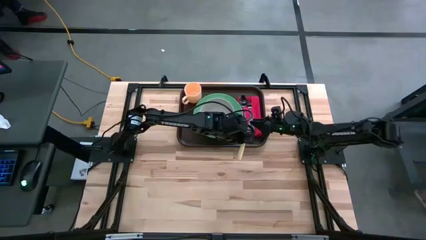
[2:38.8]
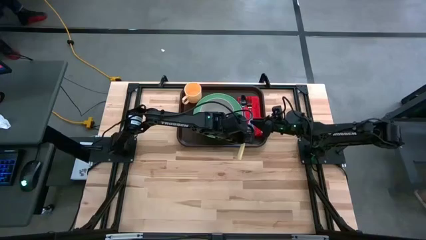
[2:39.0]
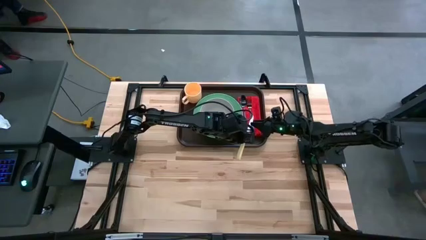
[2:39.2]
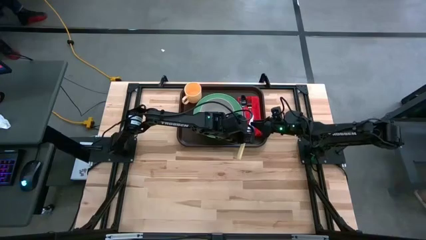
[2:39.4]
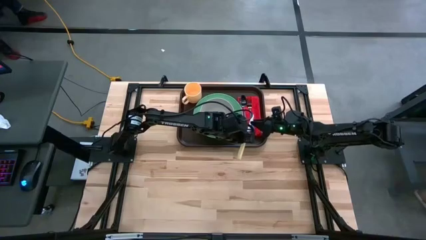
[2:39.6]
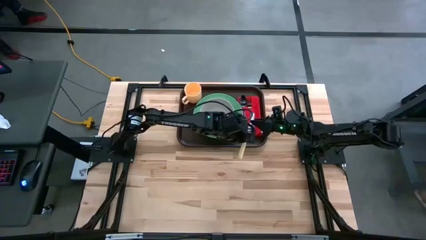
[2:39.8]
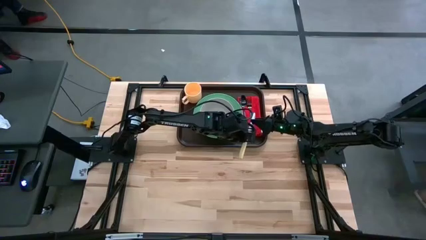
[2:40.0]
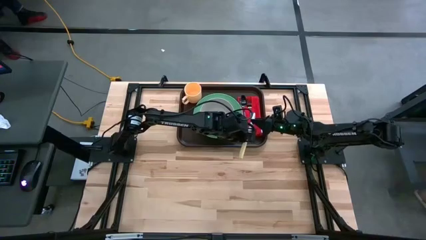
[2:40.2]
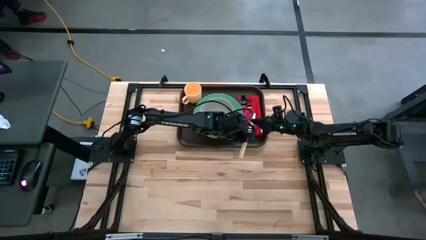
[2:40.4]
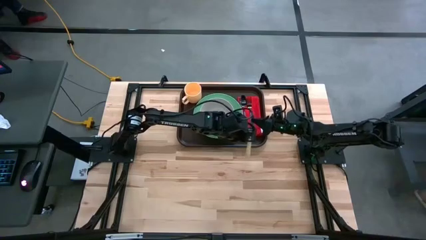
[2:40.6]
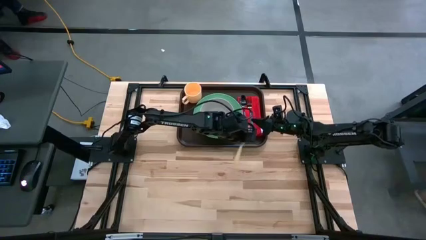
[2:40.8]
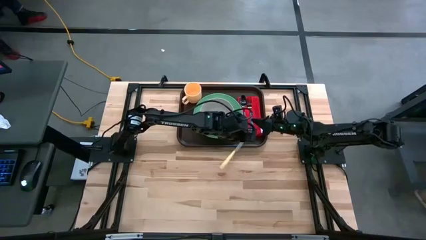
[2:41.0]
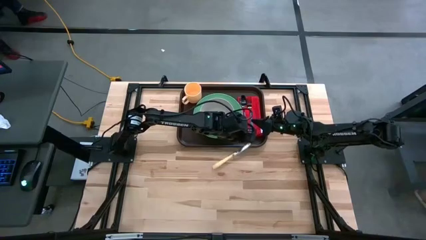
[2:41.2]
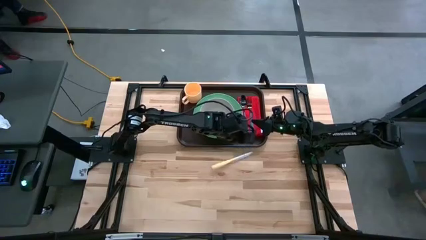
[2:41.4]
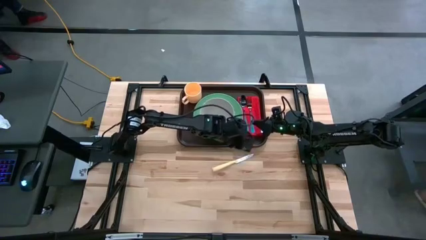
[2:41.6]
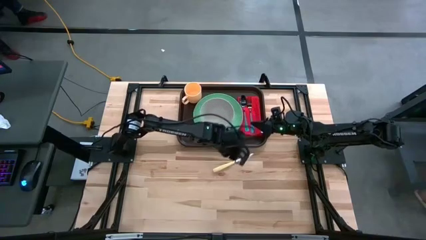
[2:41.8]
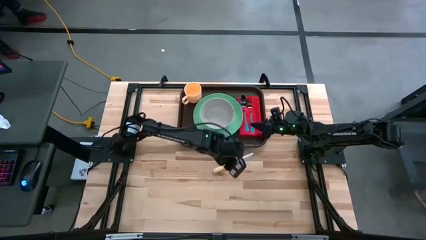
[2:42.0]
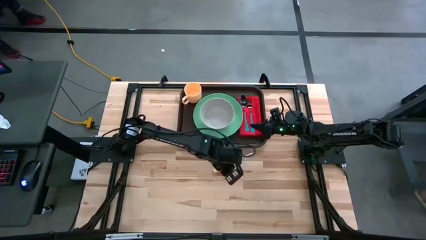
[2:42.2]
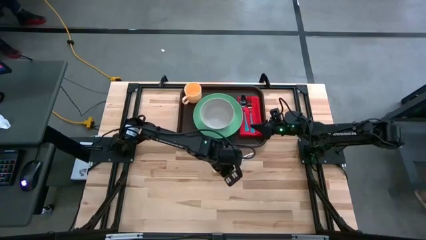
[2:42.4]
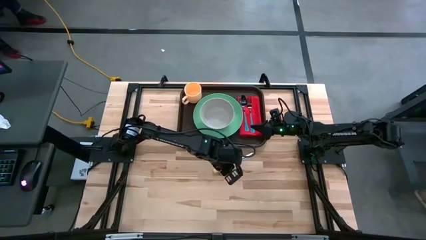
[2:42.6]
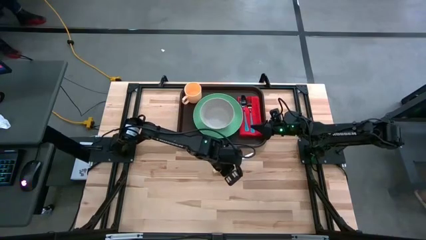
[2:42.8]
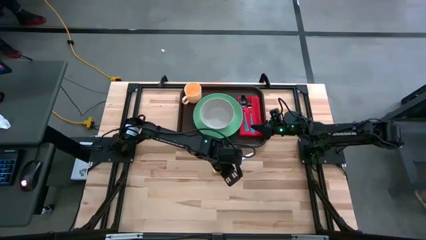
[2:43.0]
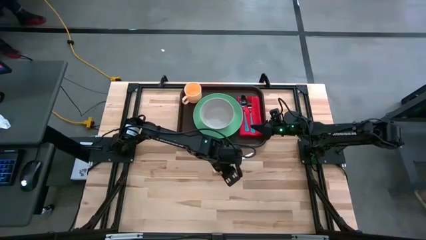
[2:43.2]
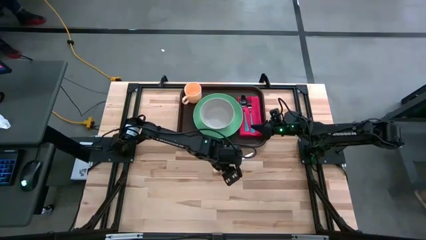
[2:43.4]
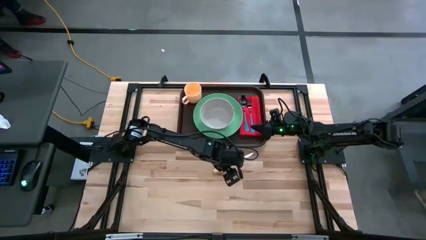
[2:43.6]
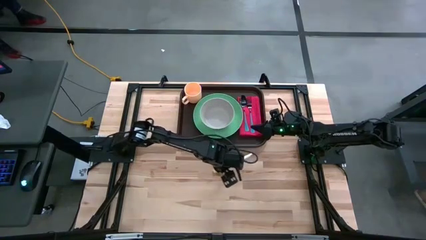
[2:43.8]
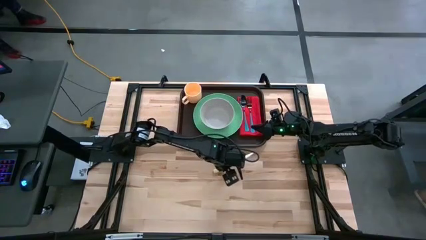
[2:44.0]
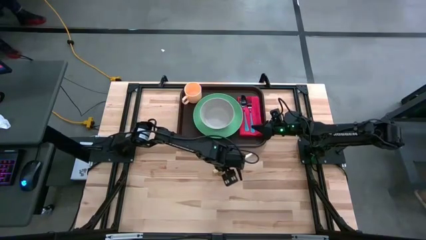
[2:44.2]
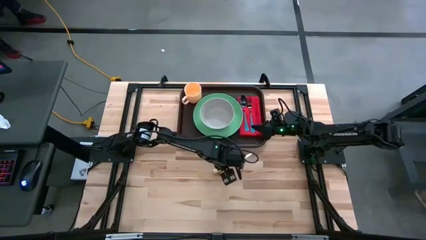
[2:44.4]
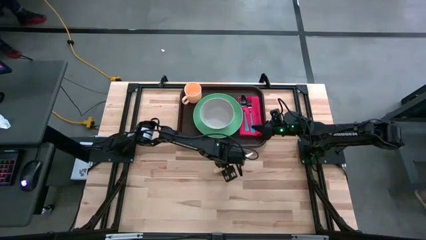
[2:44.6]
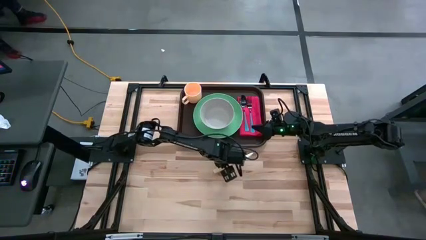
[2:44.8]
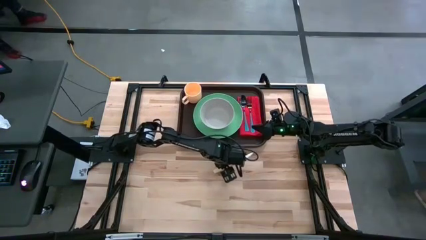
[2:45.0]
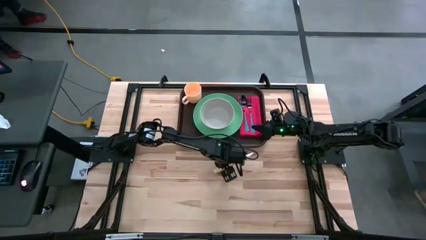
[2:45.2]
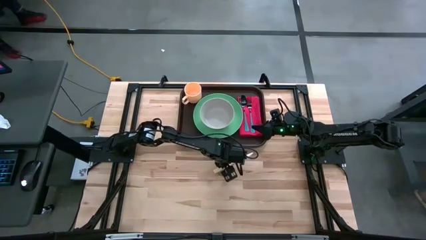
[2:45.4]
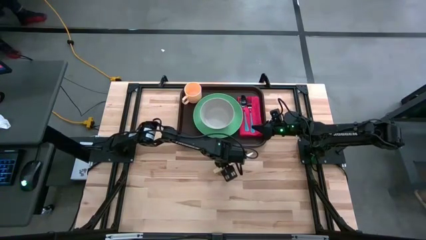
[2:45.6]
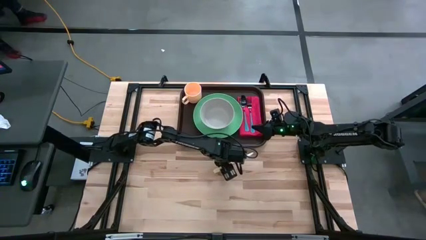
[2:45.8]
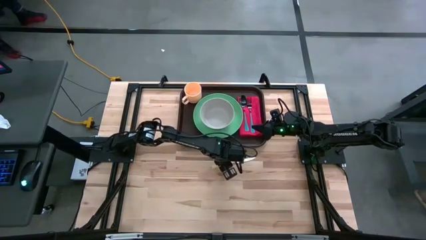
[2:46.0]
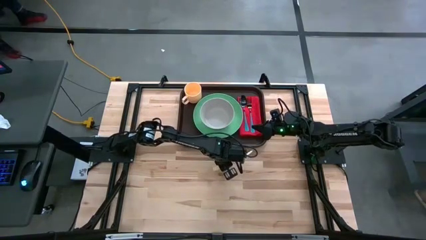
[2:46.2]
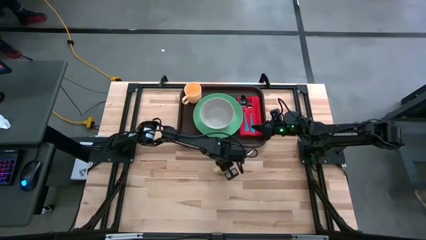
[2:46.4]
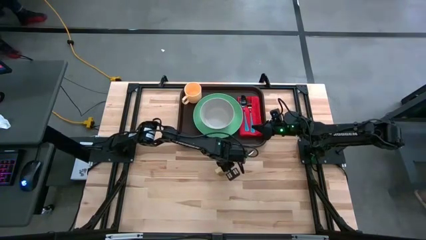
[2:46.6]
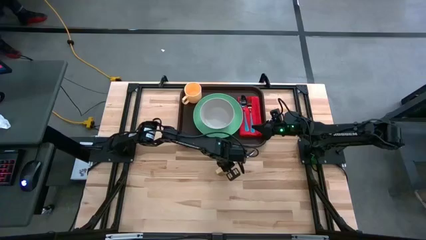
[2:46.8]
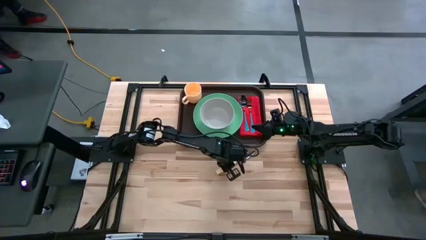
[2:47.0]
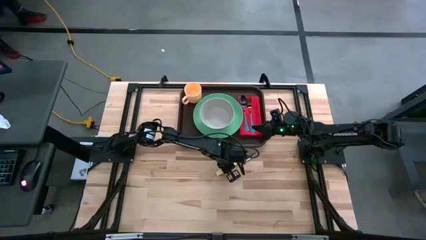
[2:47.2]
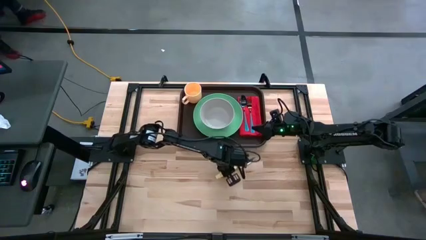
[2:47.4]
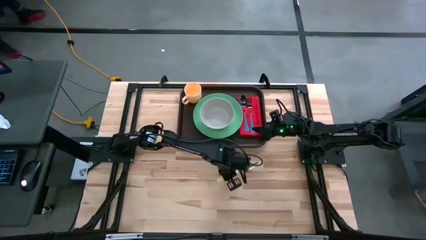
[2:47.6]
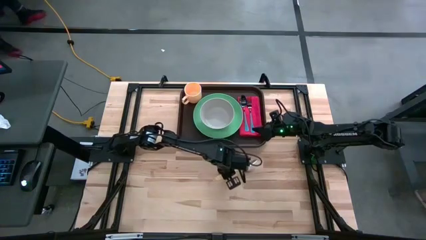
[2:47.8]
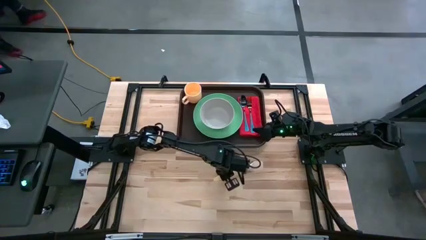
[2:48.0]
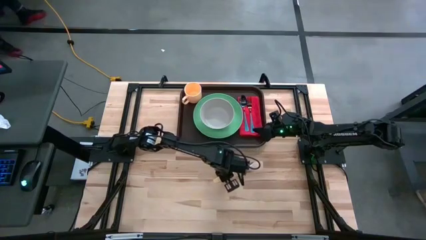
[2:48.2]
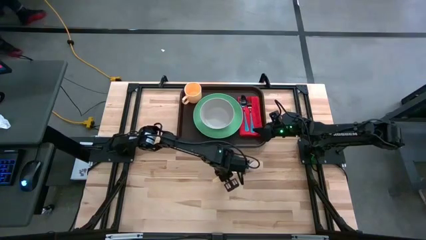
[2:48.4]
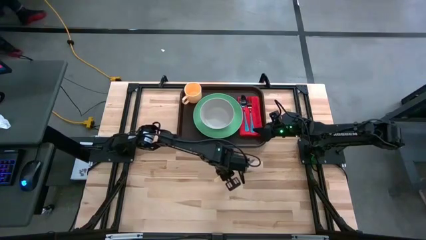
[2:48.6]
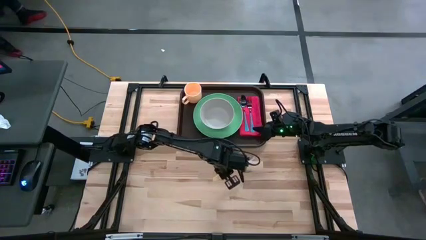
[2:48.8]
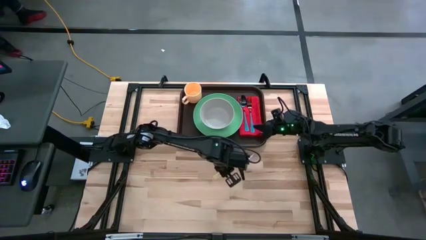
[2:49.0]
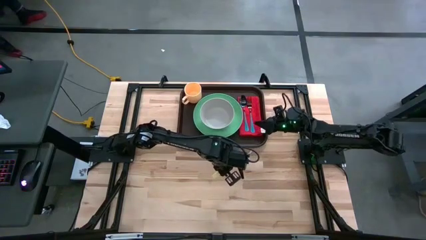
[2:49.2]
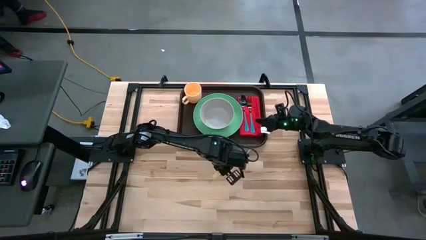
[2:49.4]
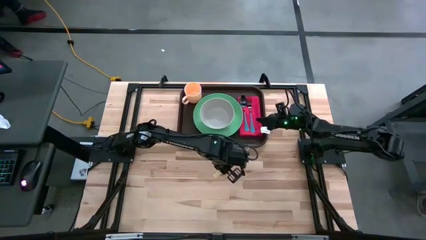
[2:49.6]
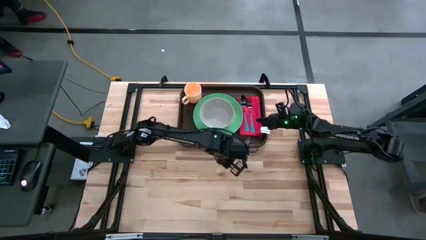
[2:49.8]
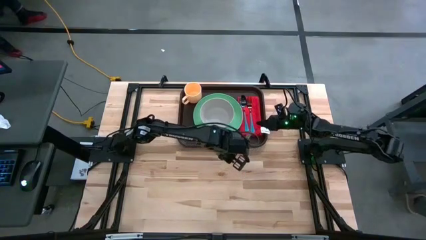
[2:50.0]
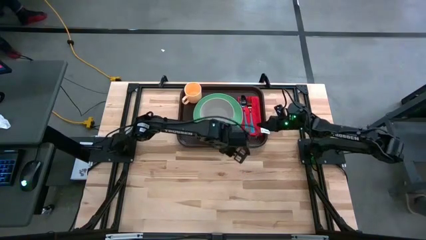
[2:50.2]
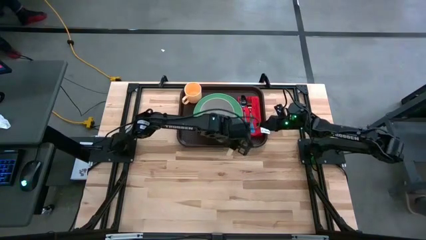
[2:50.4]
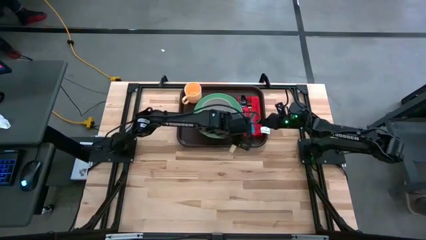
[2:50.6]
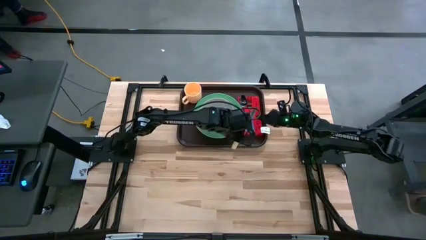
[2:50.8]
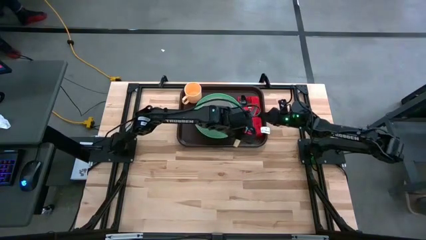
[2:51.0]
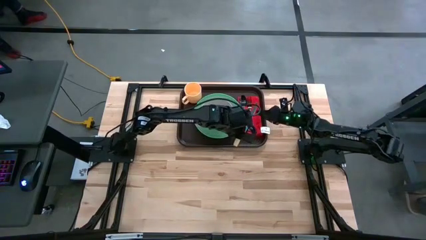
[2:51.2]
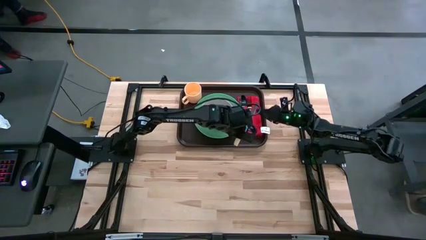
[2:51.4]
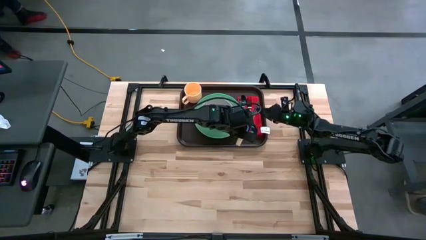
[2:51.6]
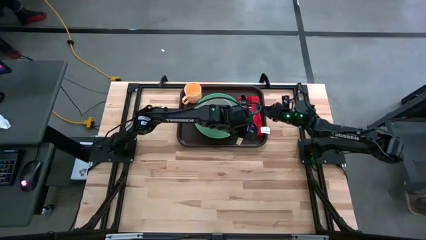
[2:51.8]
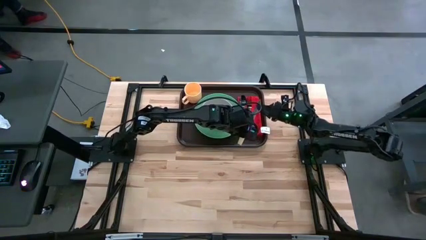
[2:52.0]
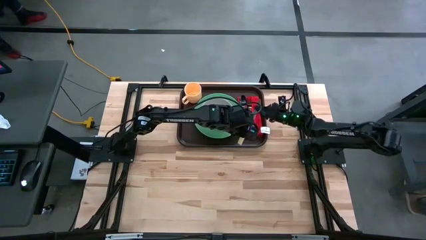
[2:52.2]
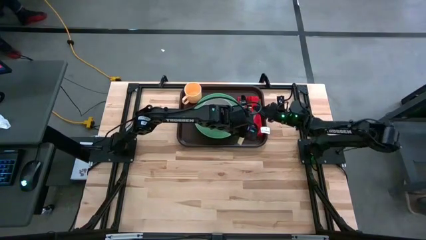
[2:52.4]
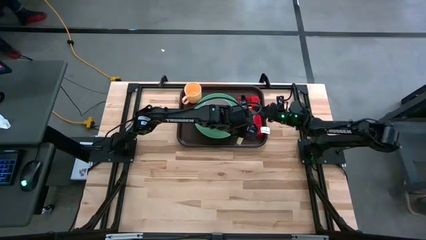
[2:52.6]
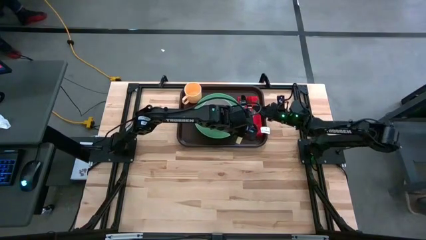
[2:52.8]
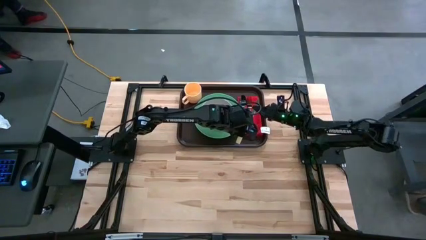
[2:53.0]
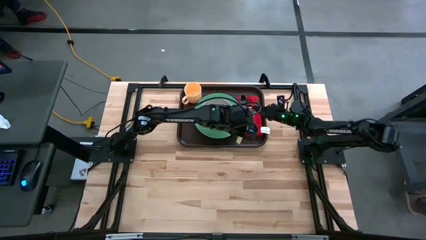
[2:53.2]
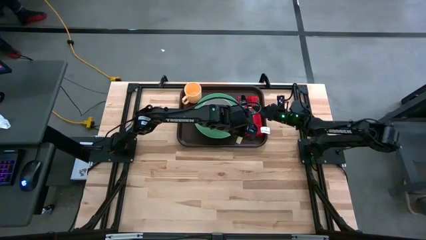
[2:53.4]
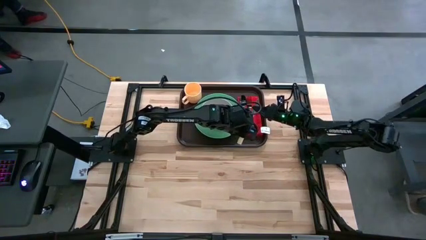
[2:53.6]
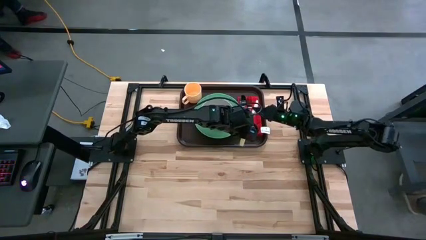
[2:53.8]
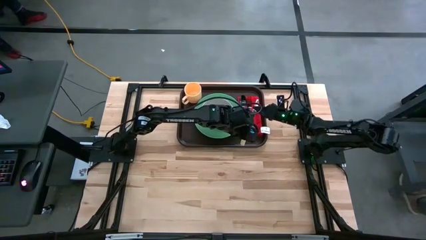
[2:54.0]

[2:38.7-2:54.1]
Task: Set up tray
Put the yellow knife on top of the red napkin to the right of the blue fork
